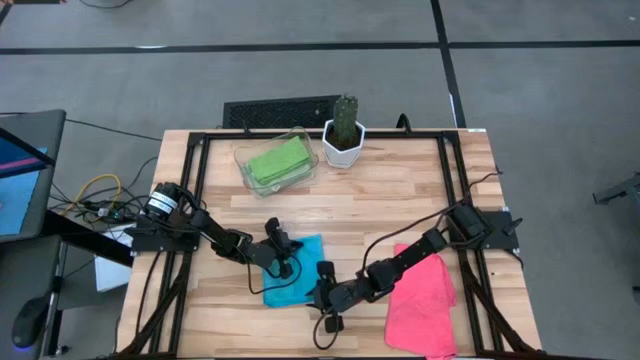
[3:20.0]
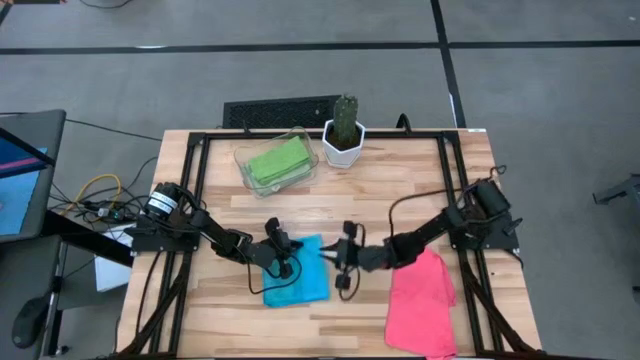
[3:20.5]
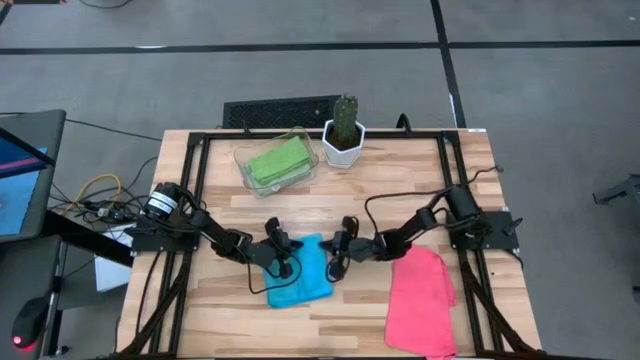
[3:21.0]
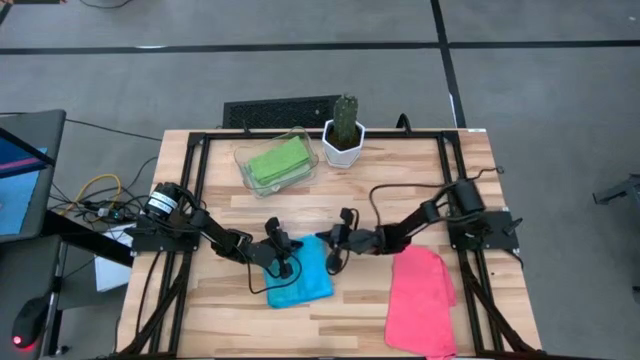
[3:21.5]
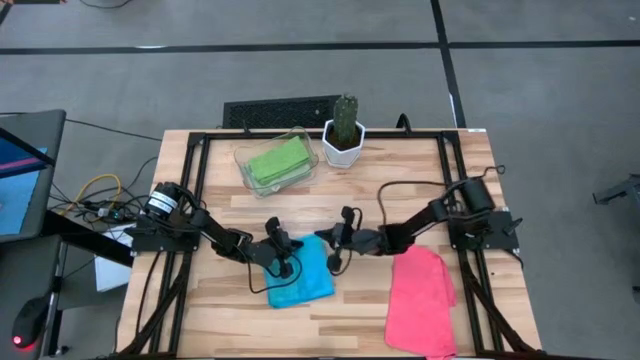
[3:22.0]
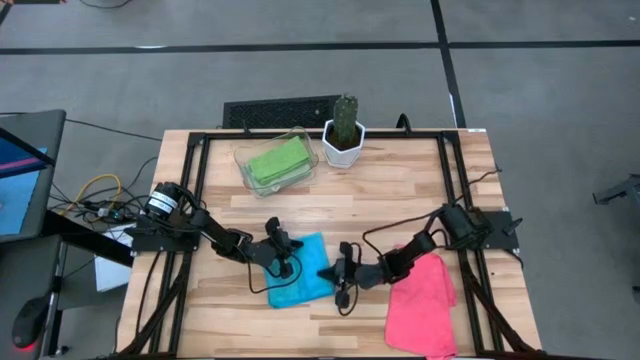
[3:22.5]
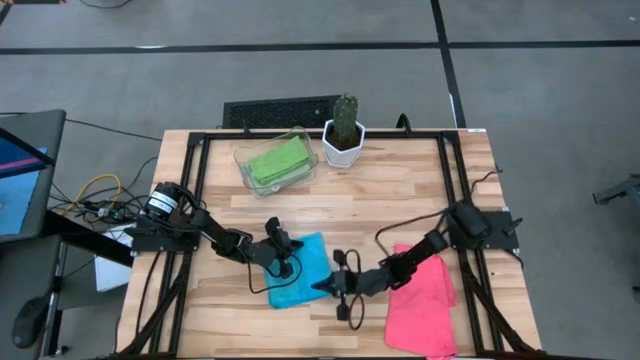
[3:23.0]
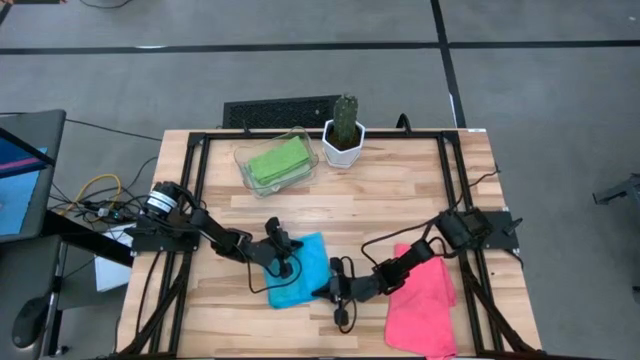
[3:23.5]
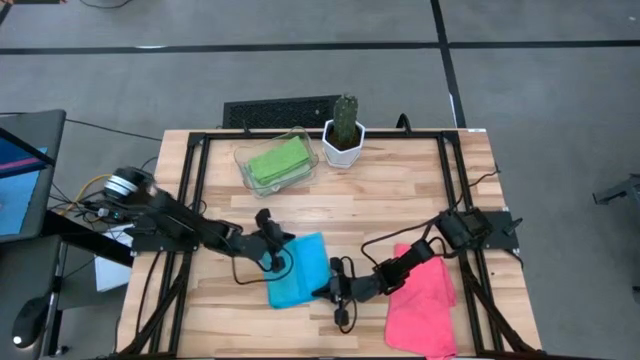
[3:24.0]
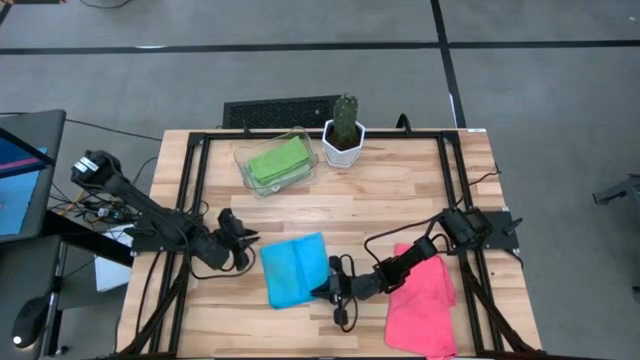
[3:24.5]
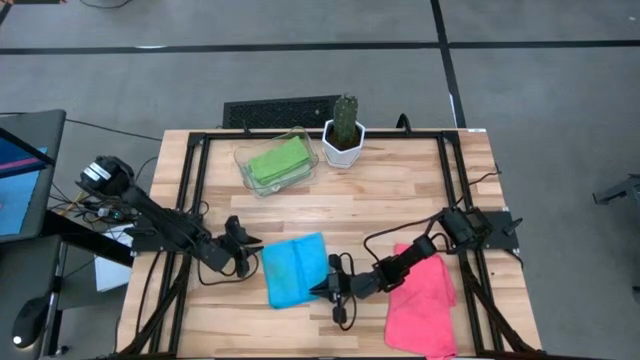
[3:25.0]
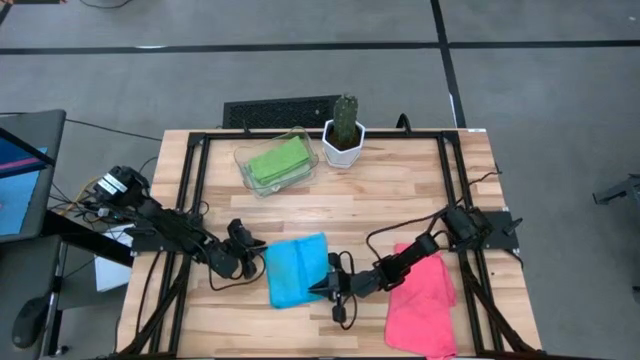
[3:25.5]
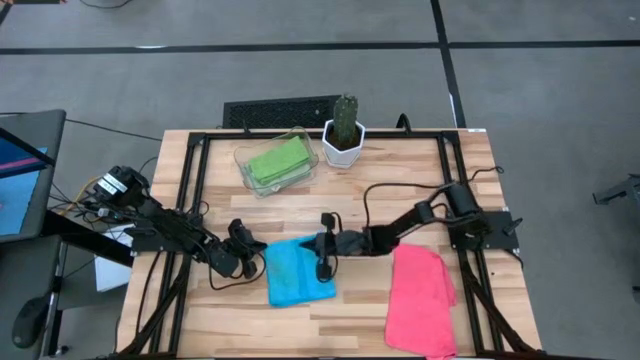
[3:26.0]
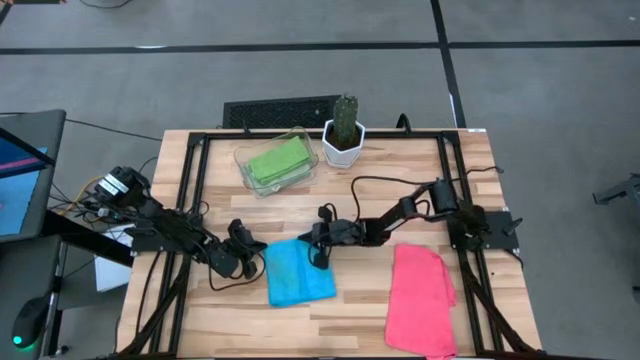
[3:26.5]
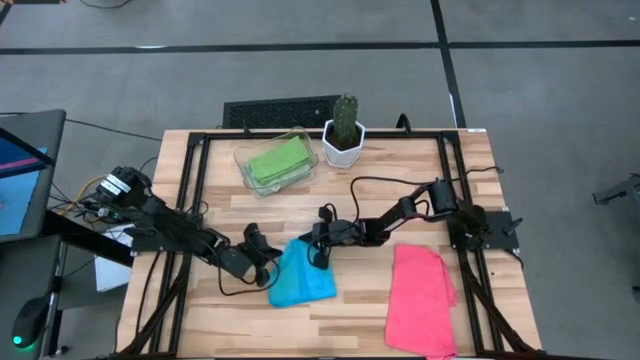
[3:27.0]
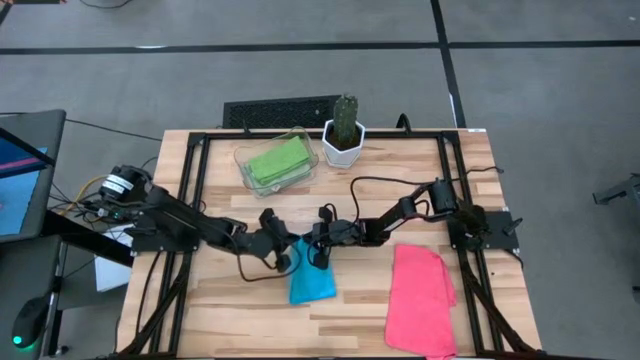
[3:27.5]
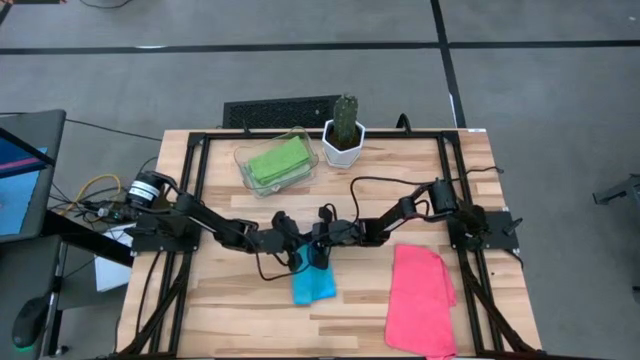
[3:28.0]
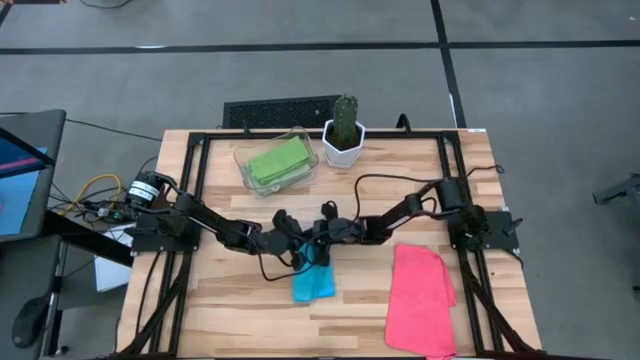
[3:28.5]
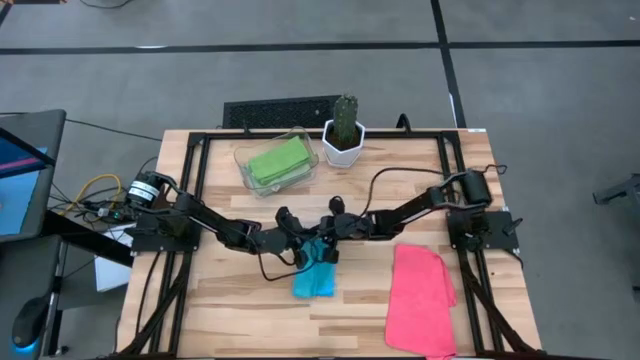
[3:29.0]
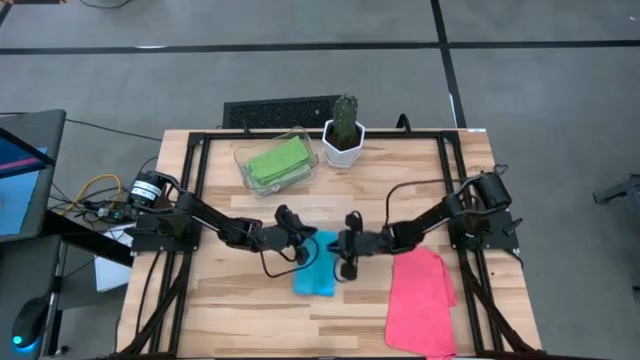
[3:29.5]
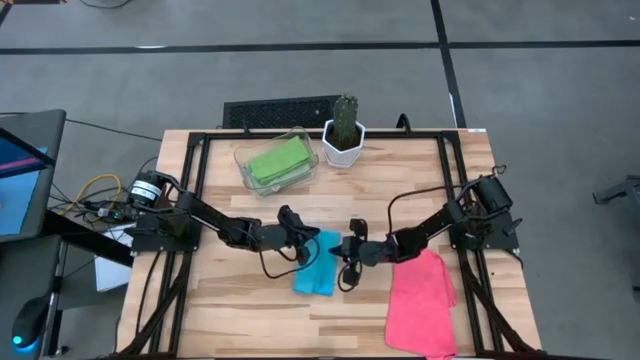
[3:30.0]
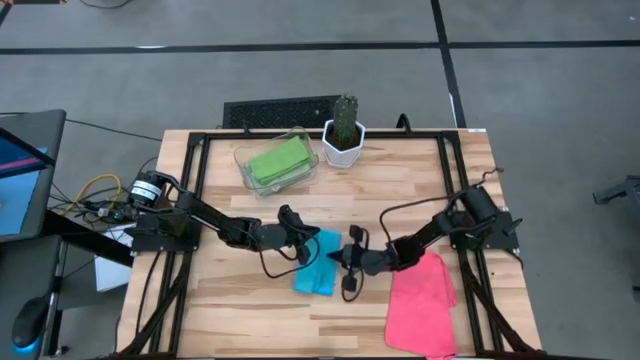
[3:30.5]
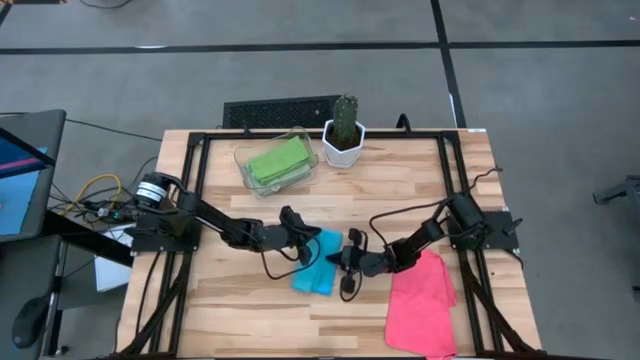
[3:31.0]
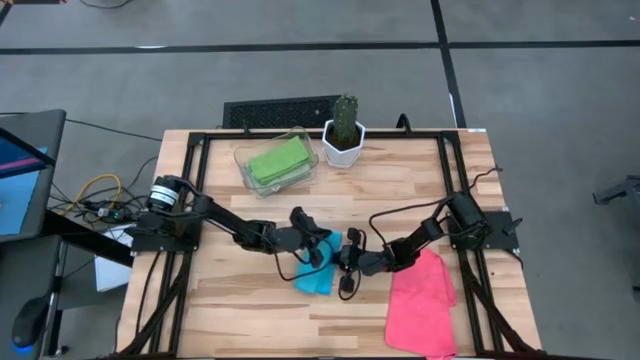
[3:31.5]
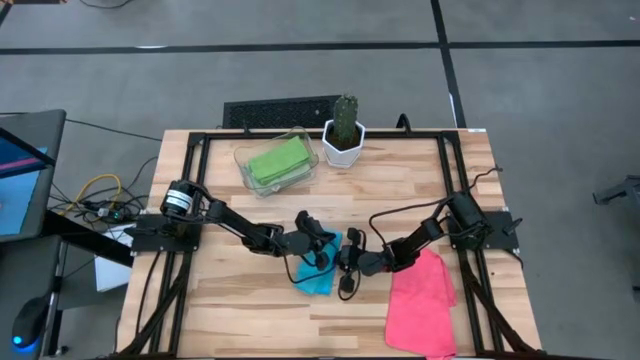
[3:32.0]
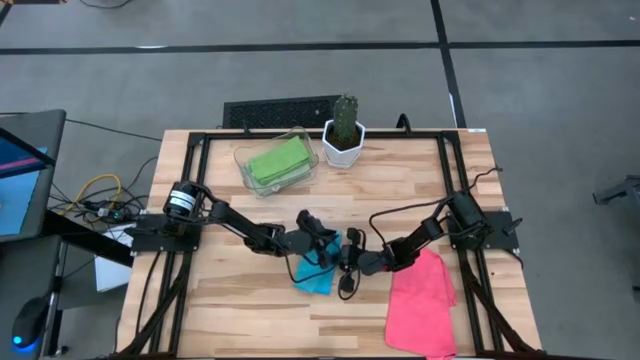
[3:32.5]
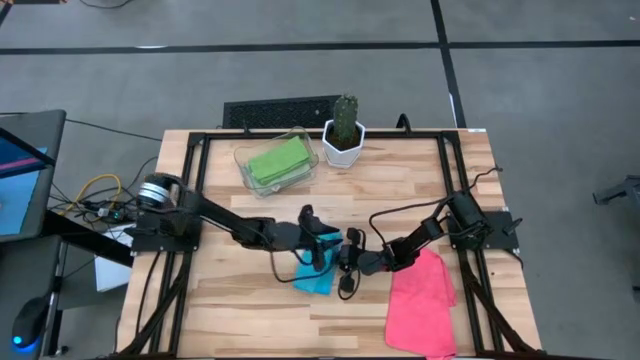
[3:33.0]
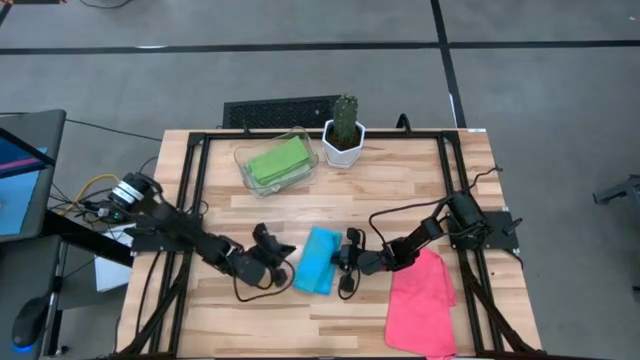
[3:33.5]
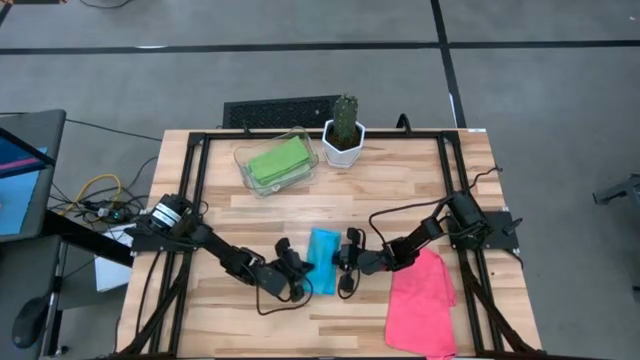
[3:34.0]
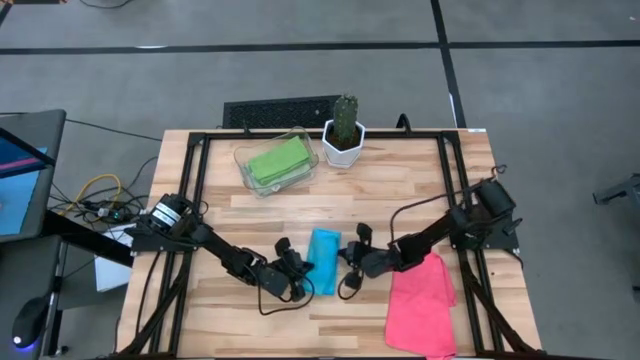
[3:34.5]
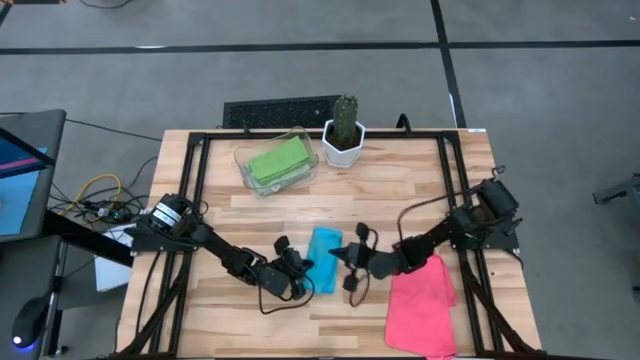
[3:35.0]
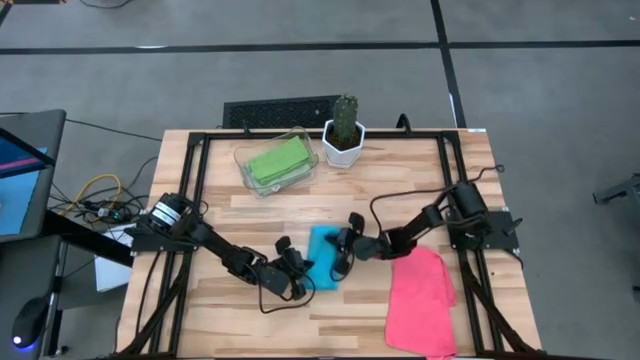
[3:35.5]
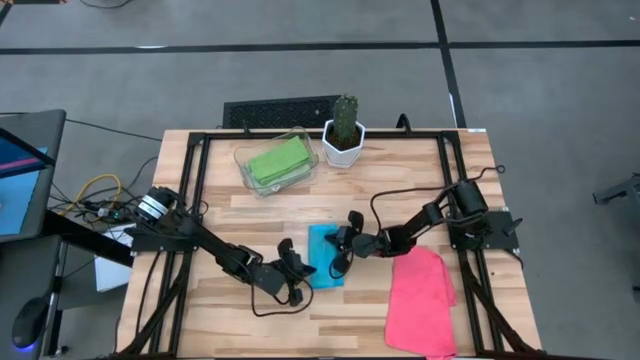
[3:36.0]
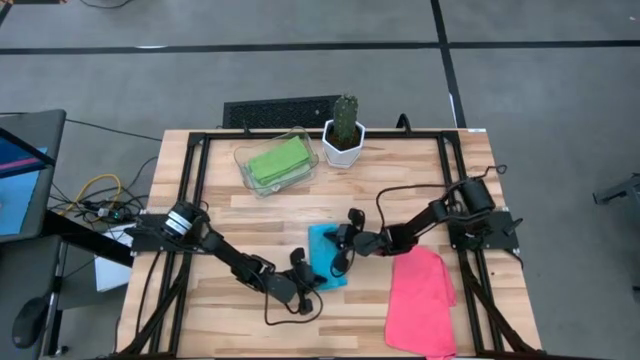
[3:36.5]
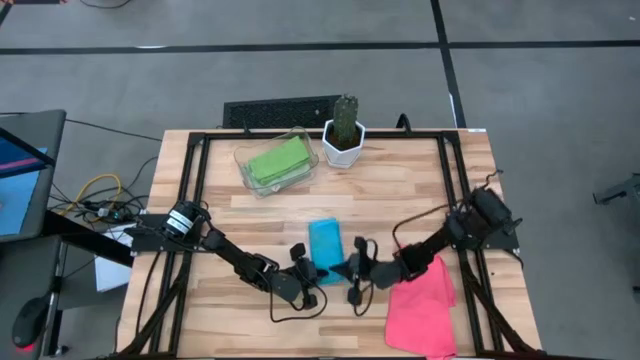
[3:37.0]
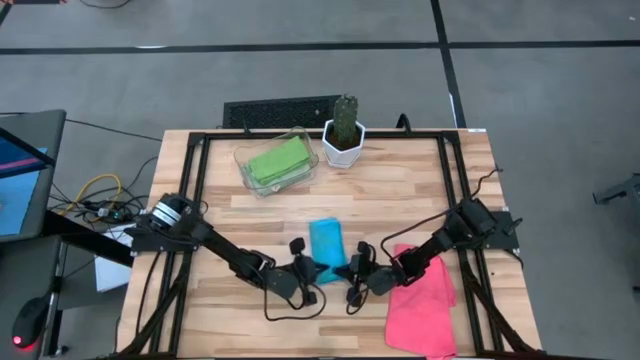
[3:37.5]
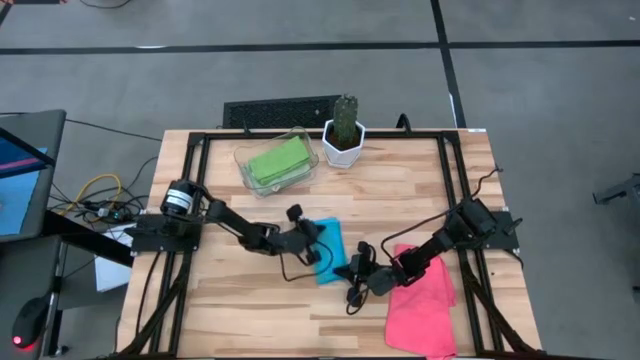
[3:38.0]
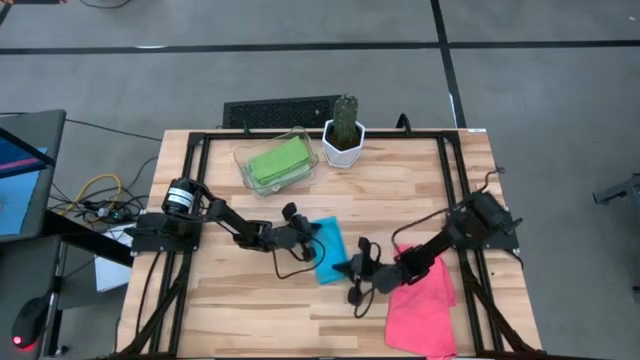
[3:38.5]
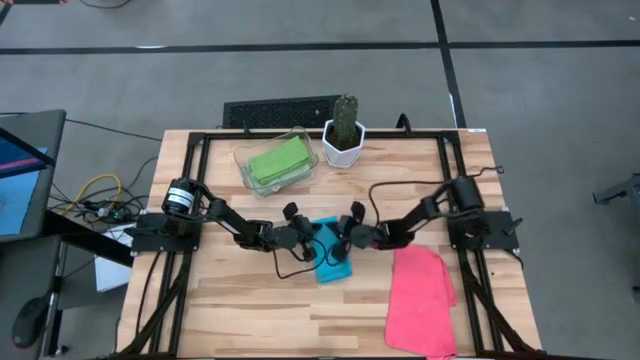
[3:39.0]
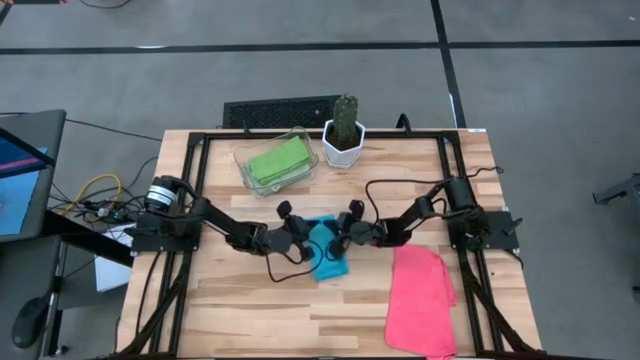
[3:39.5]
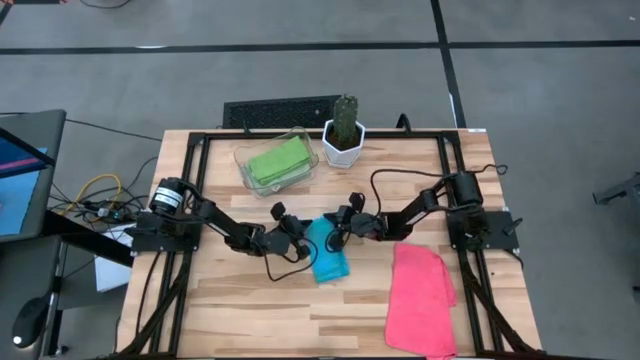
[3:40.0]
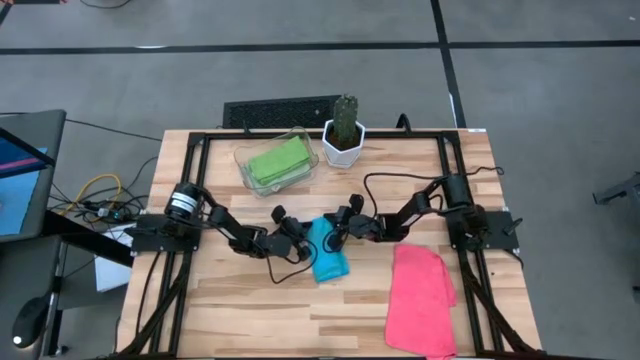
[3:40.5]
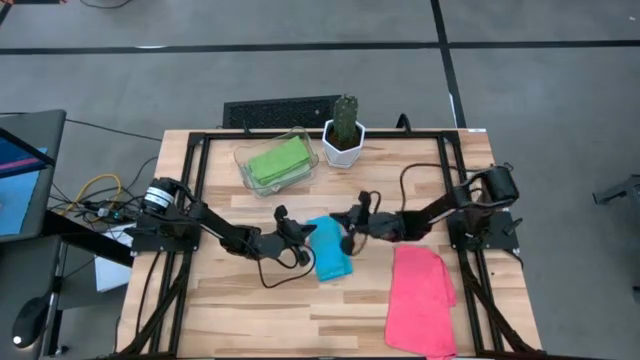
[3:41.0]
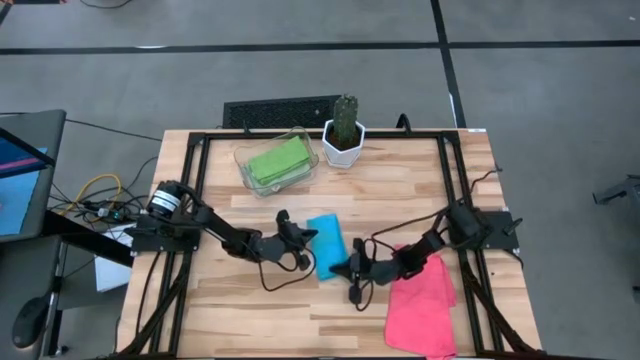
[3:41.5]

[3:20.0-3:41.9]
Task: Fold microfiber towels
Fold the blue microfiber towel
